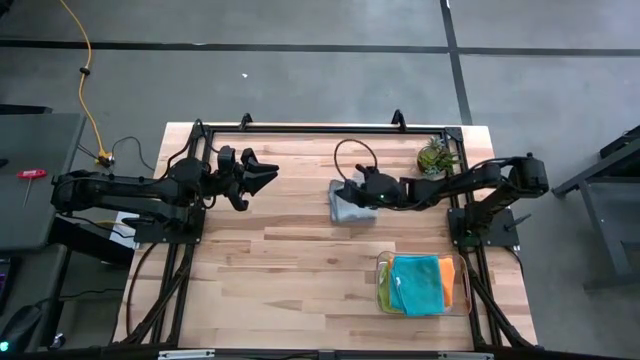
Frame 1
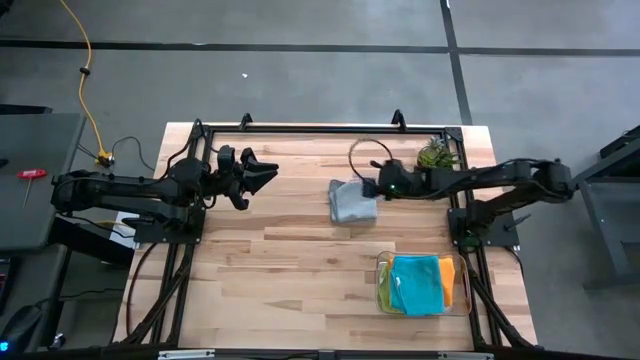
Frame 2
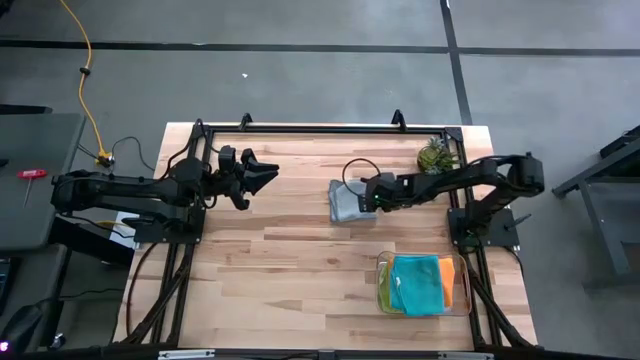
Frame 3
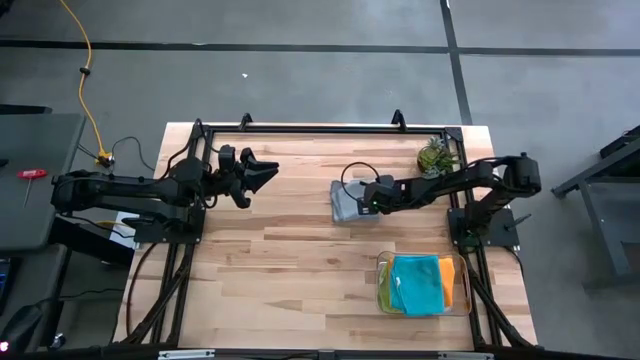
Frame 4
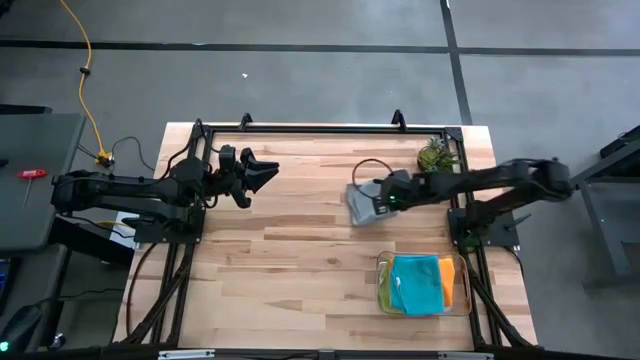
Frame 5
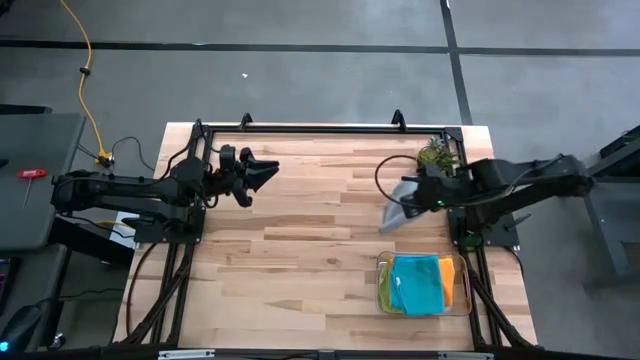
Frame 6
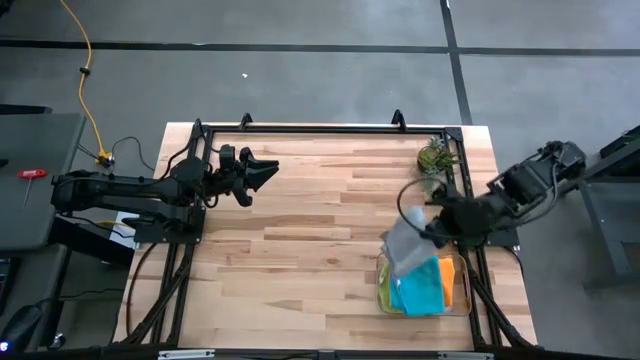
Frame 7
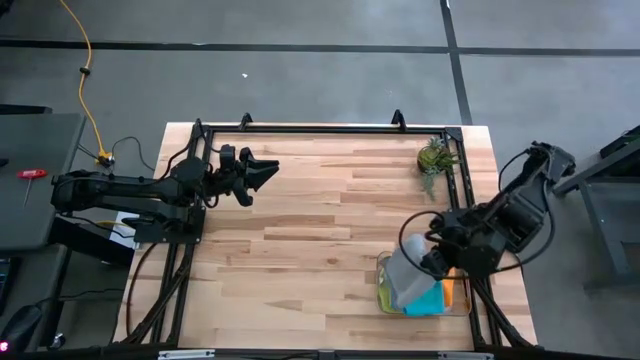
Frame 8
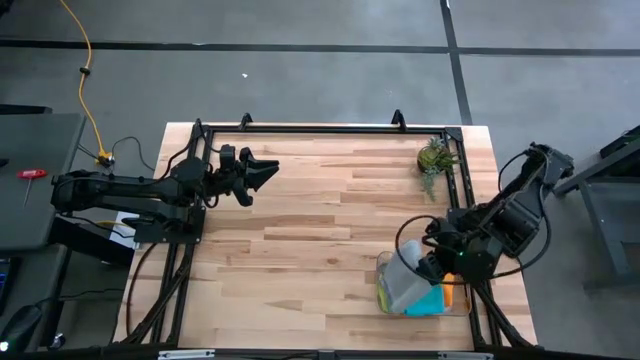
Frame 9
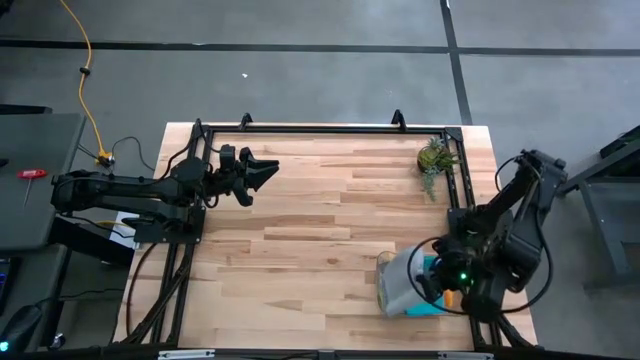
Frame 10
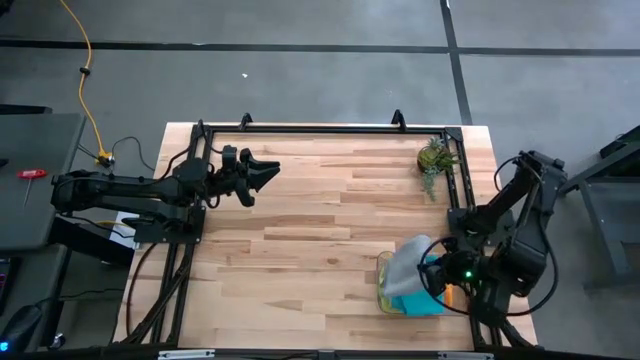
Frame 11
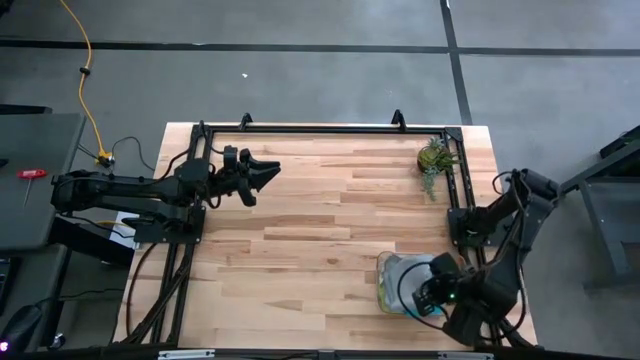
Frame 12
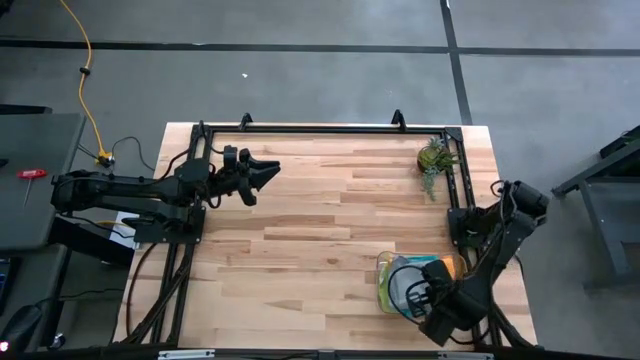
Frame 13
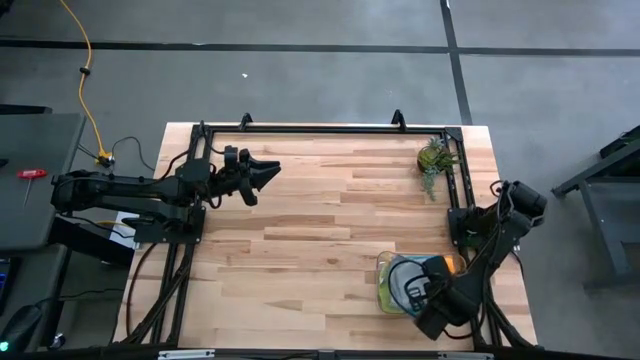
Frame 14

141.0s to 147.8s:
Task: Fold microfiber towels
Put the gray microfiber cloth into the transparent bin

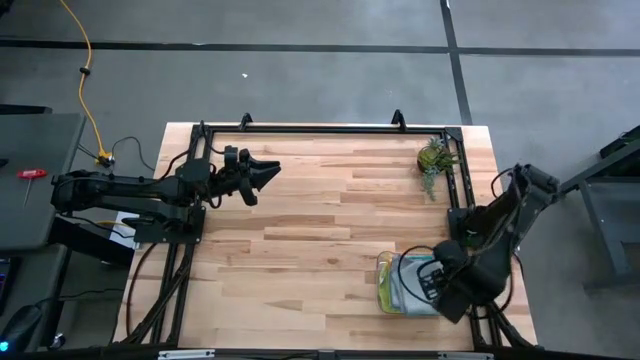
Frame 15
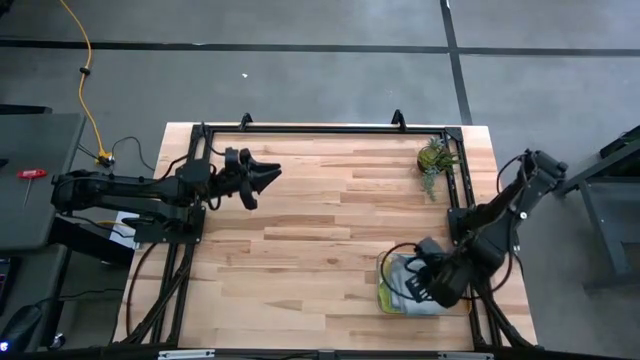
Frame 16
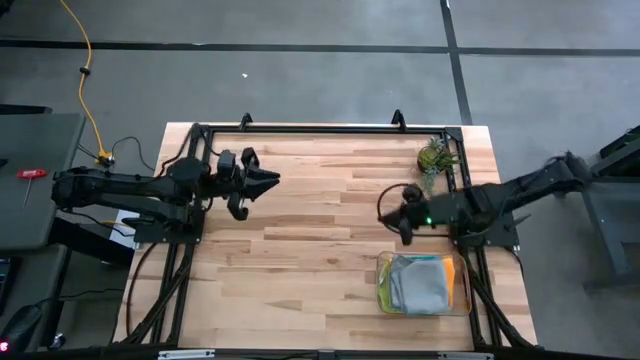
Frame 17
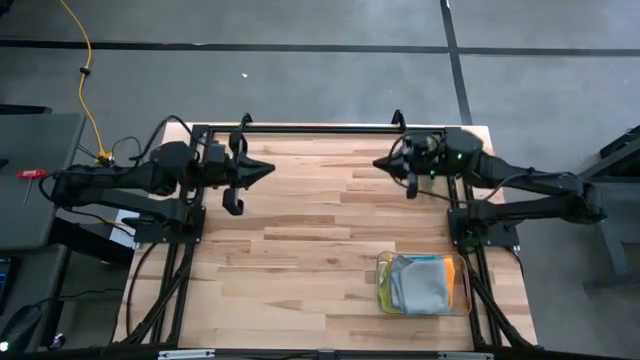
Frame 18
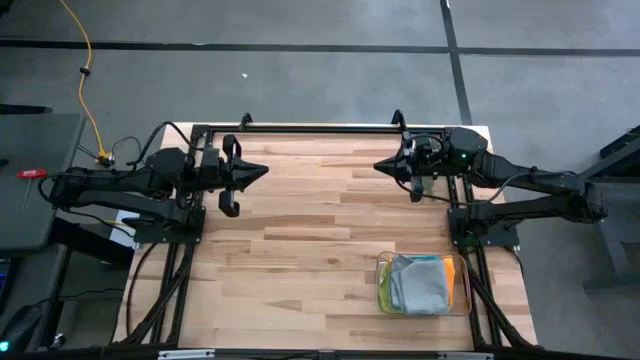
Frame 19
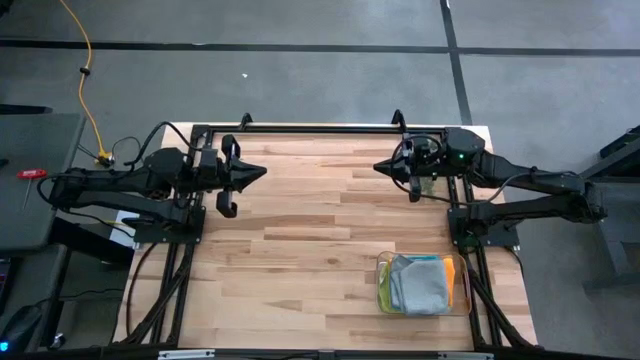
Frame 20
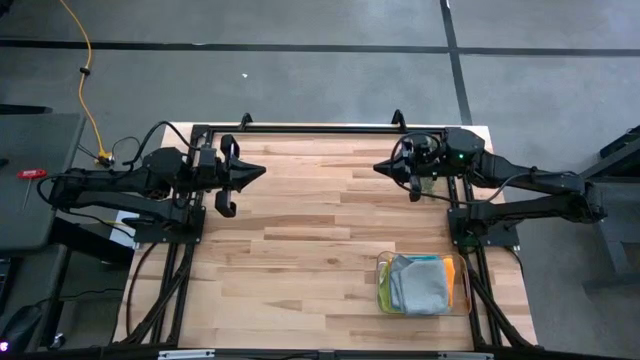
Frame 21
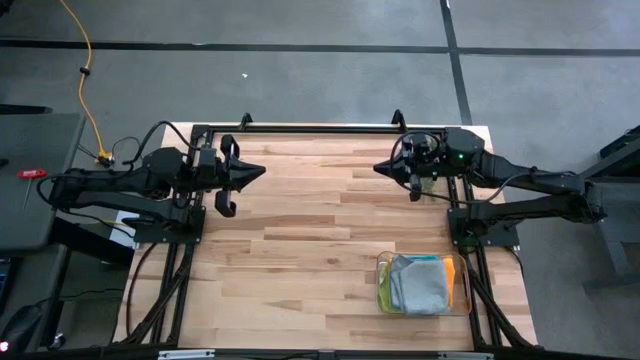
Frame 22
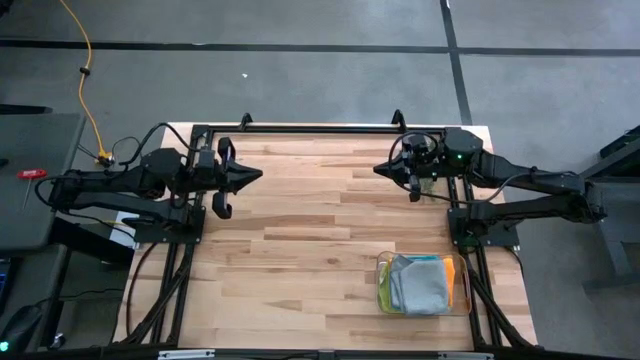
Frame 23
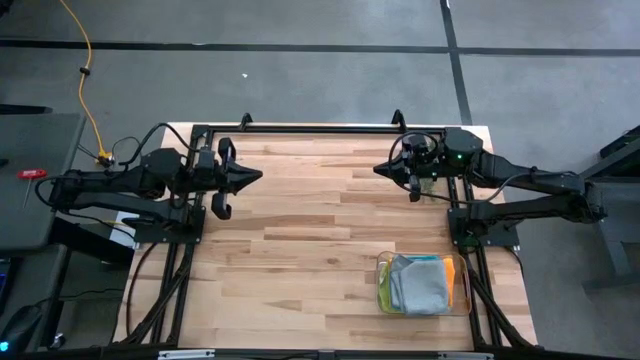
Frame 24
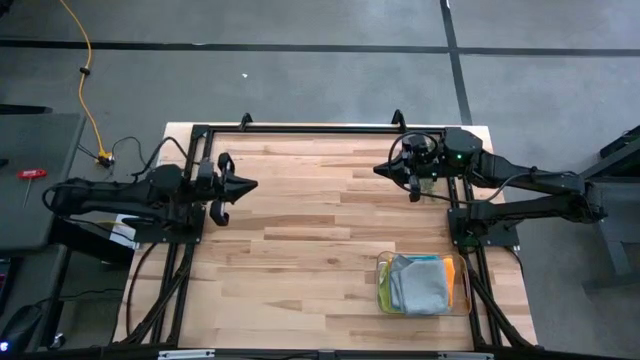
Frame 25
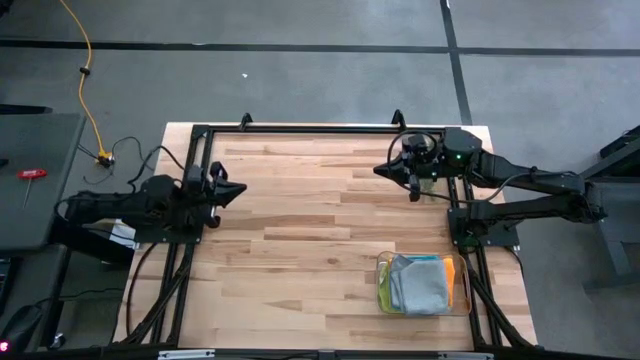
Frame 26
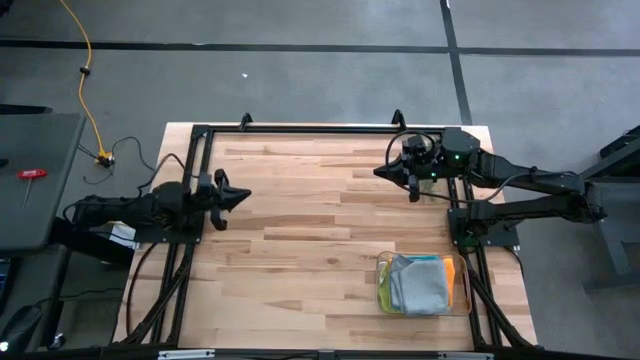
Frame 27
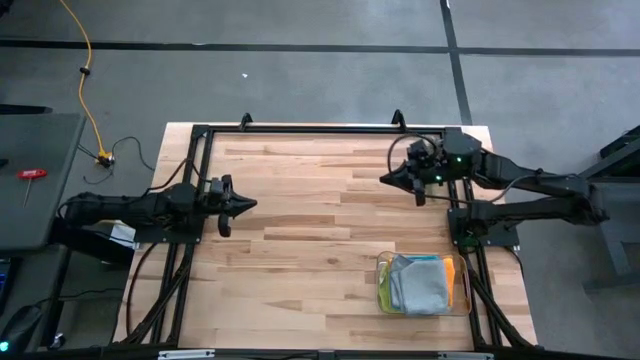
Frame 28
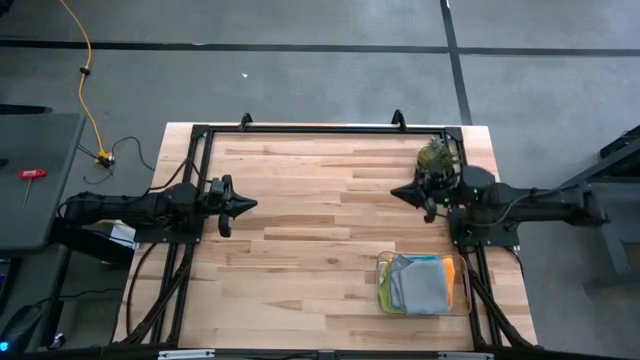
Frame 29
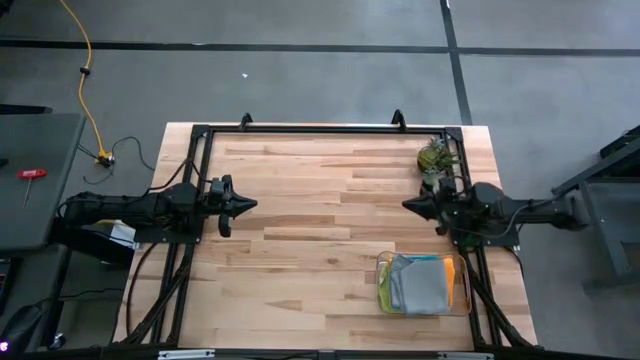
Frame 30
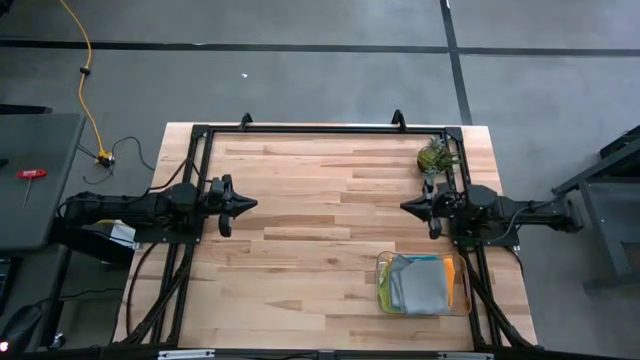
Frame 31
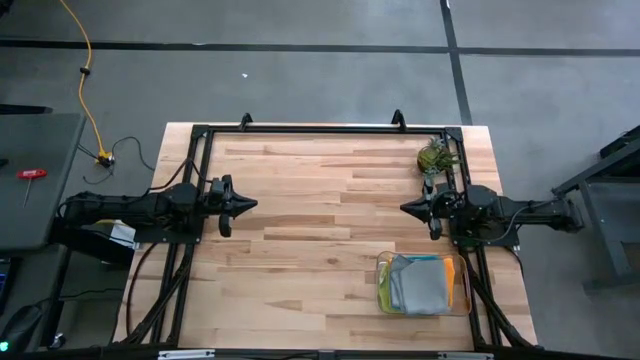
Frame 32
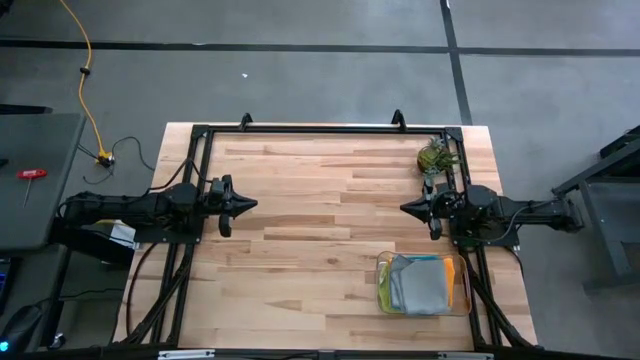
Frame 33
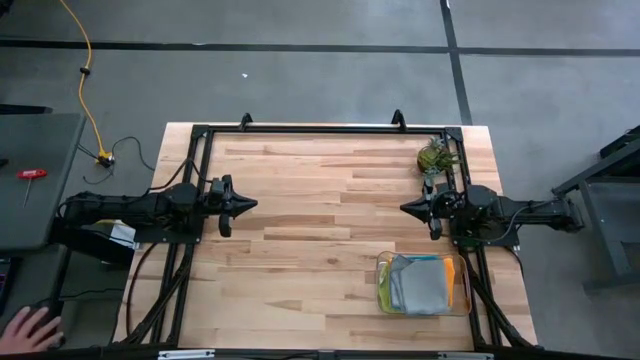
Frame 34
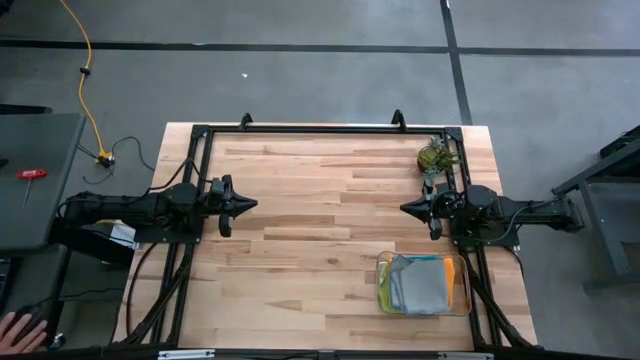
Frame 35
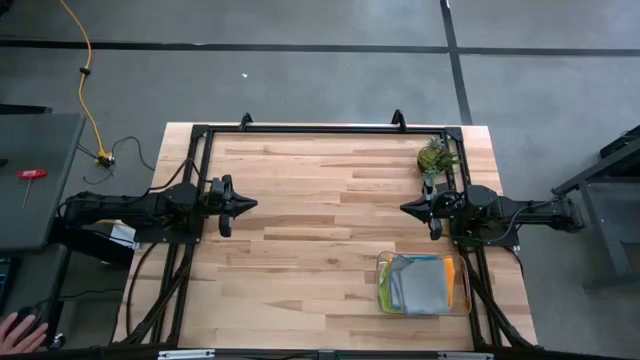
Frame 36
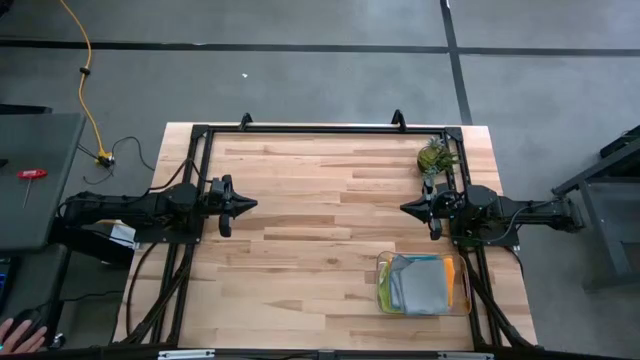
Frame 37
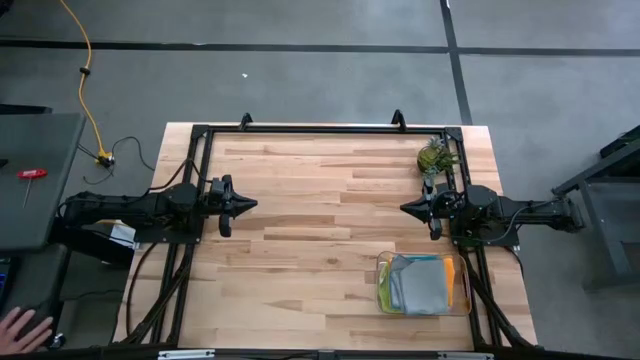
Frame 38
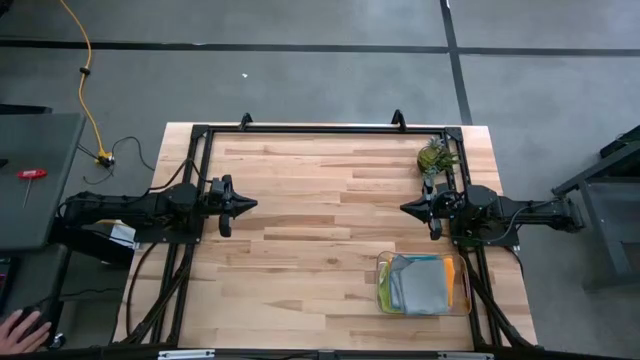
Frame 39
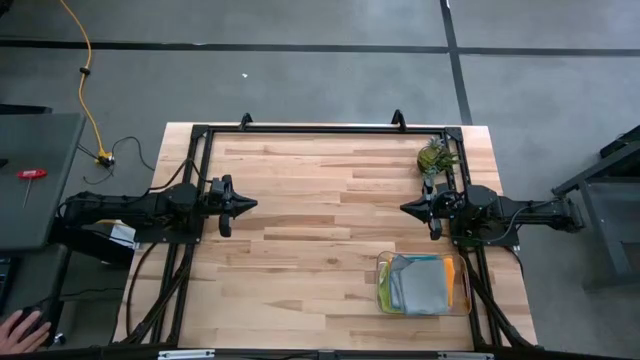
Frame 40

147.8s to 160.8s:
Return to Home Position

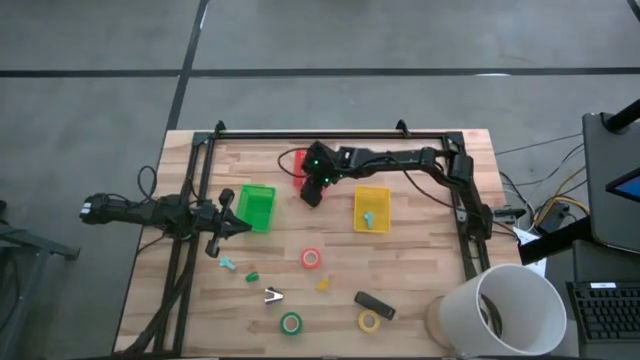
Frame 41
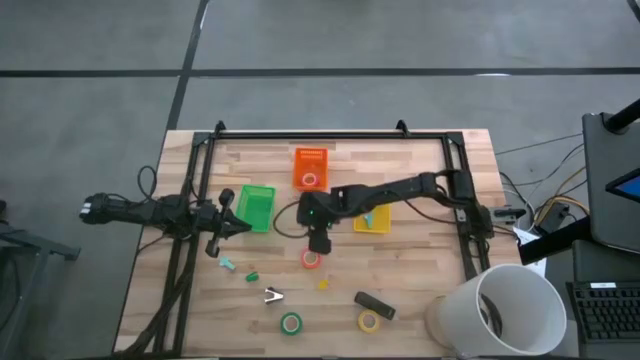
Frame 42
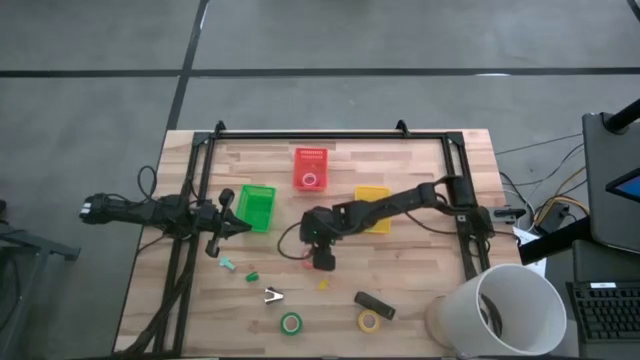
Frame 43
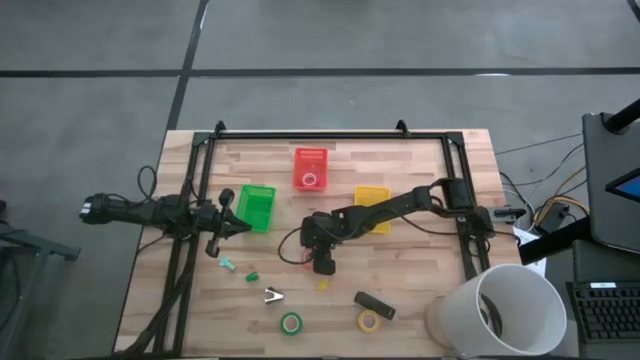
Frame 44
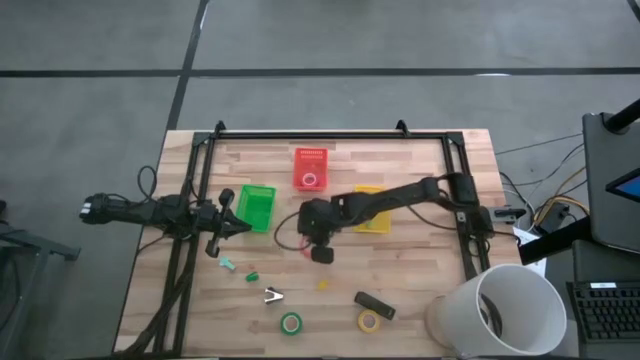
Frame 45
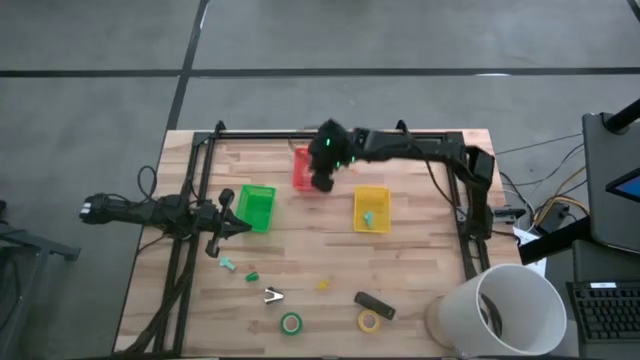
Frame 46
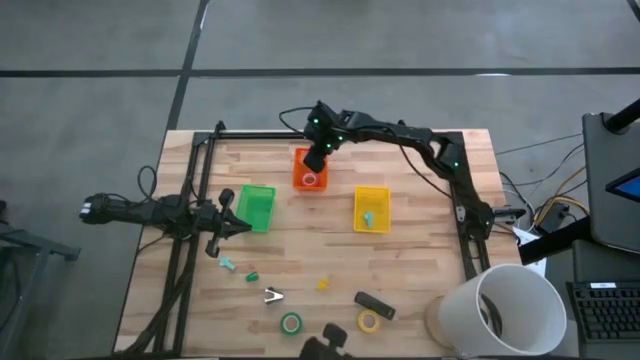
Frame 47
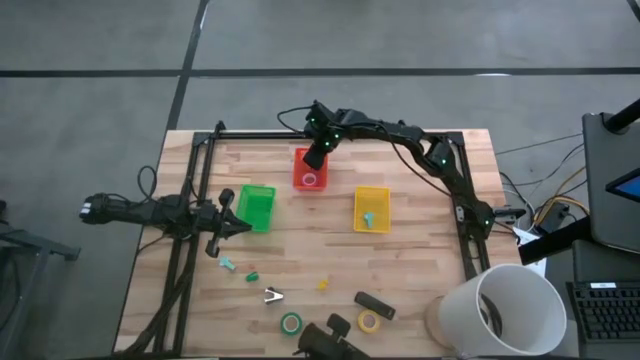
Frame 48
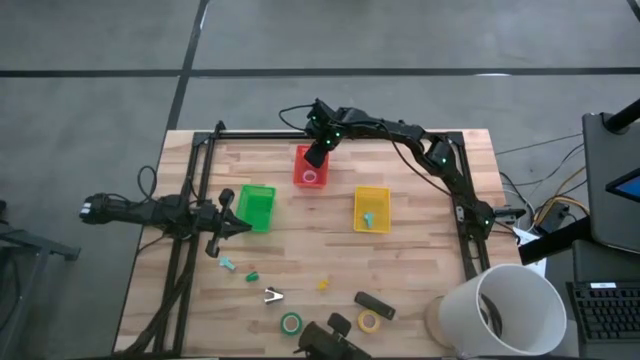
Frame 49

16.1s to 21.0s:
Task: Pick and place Stapler, Stapler remover, tape
Put the orange tape into the orange basket
